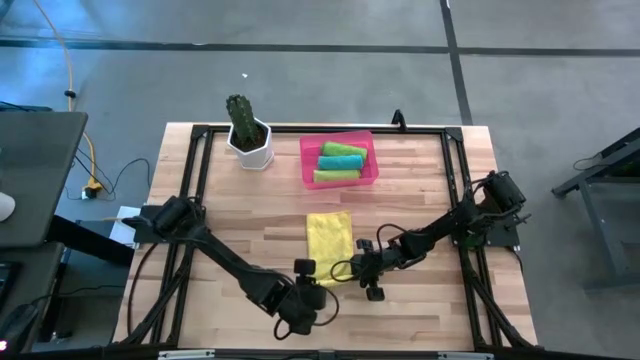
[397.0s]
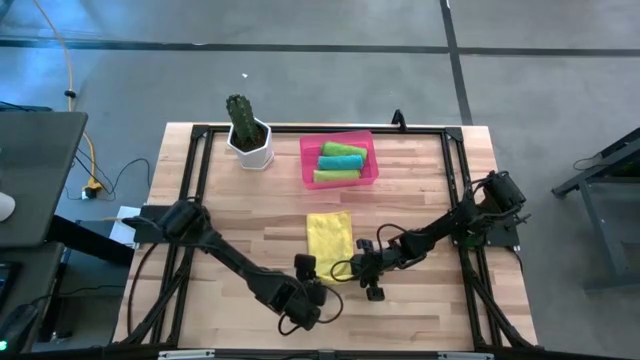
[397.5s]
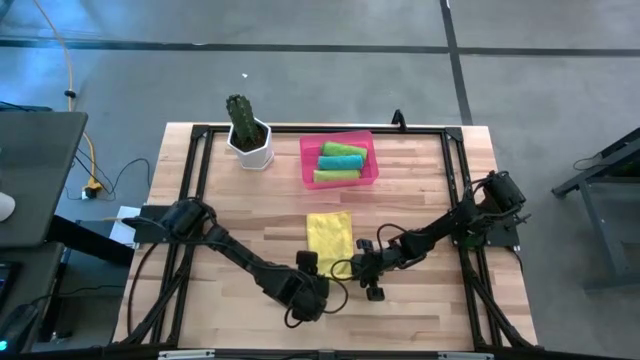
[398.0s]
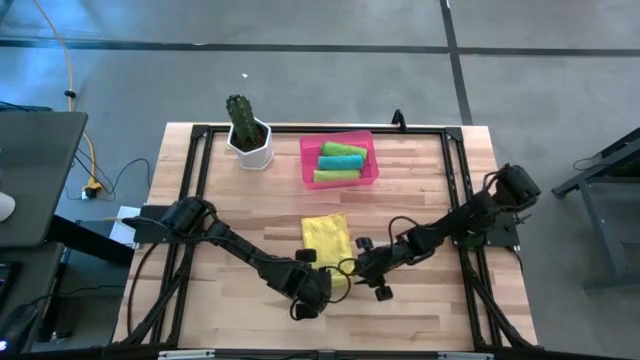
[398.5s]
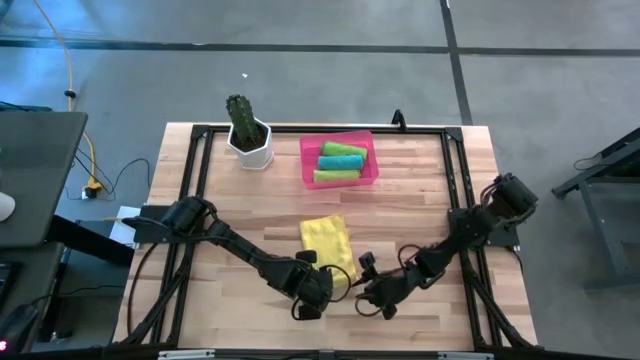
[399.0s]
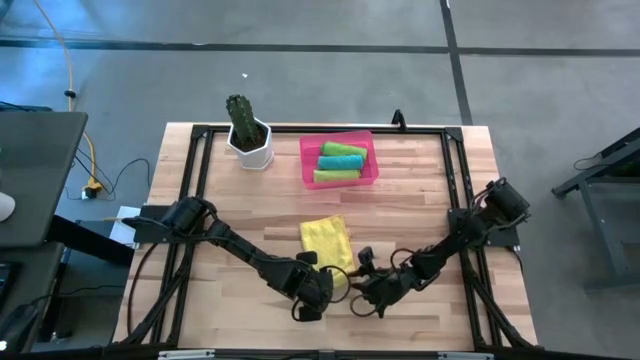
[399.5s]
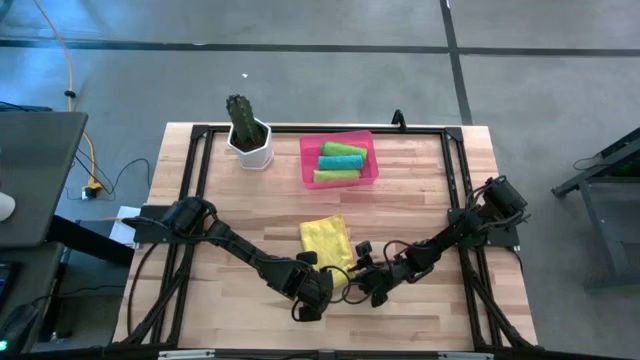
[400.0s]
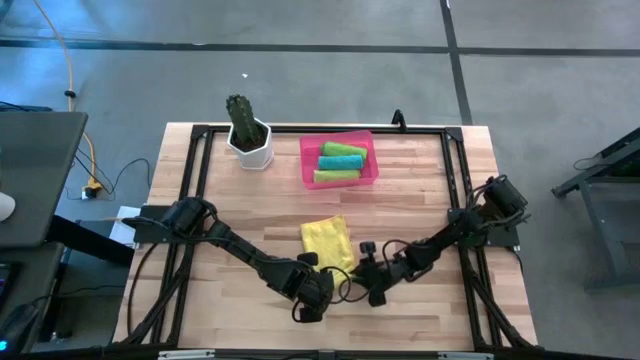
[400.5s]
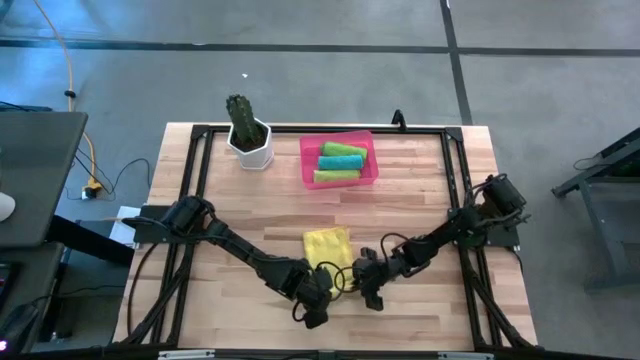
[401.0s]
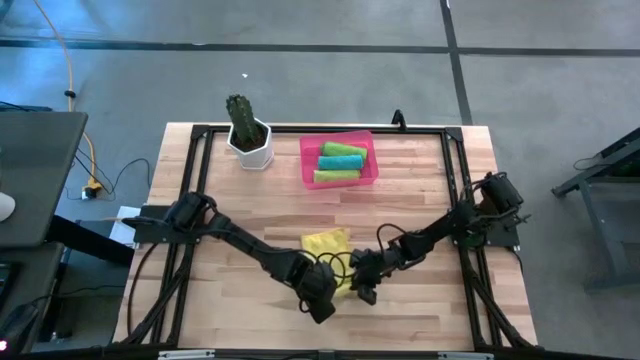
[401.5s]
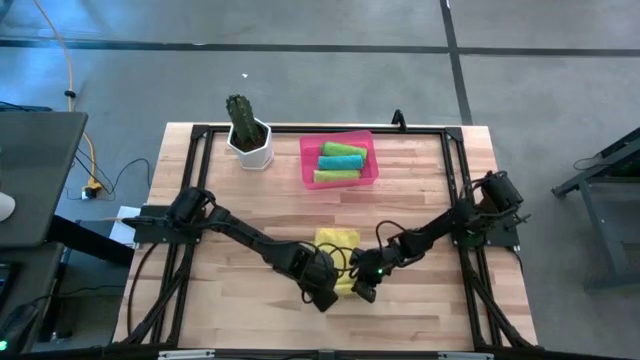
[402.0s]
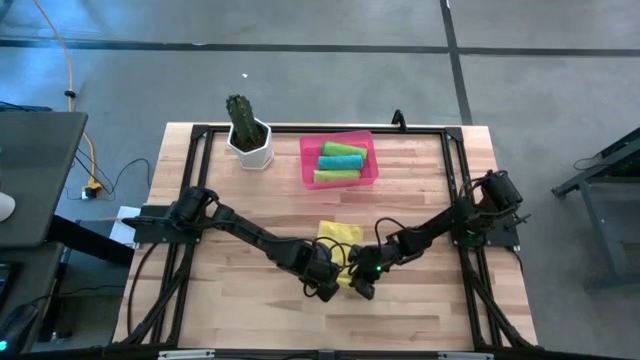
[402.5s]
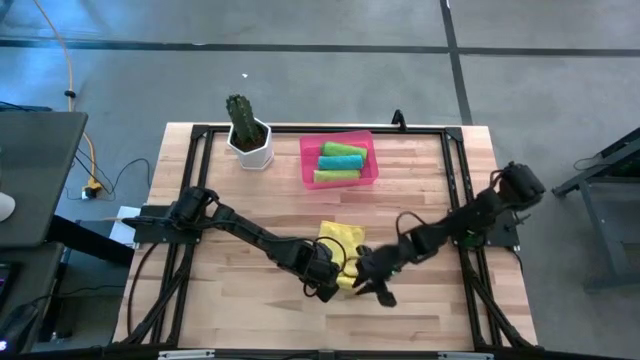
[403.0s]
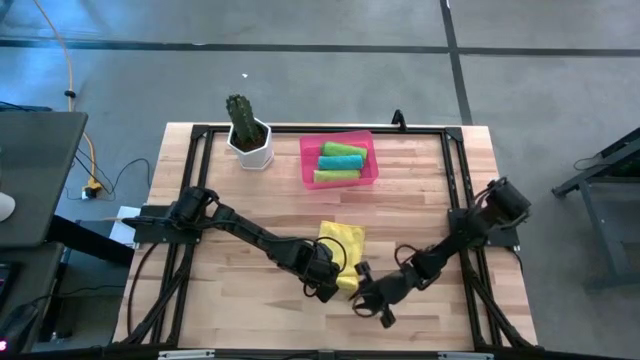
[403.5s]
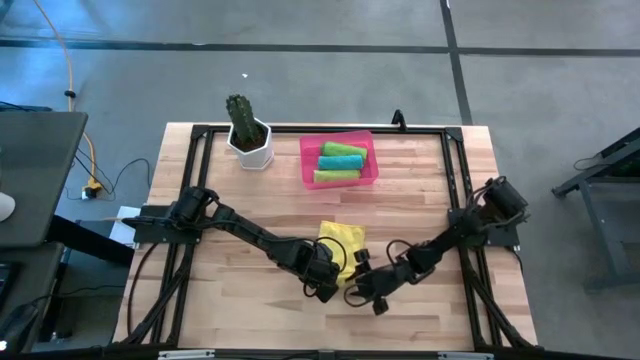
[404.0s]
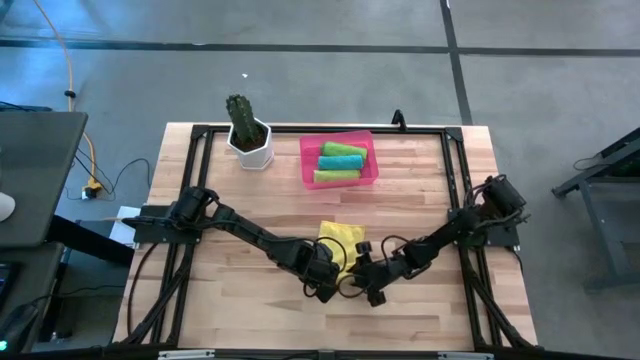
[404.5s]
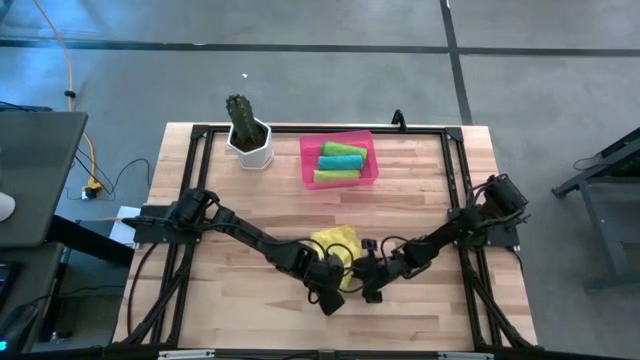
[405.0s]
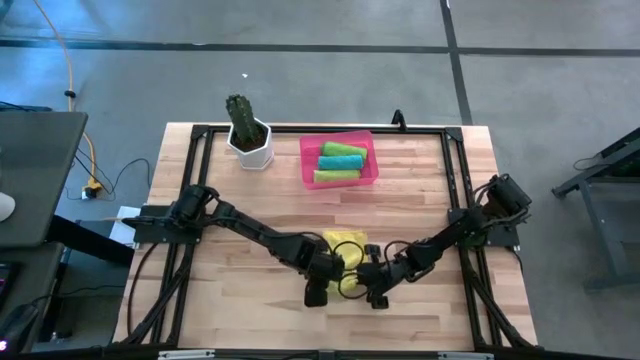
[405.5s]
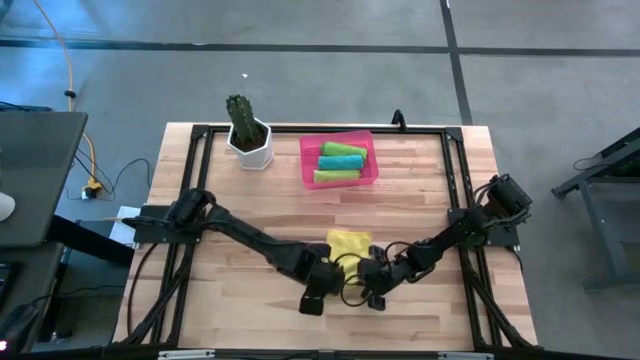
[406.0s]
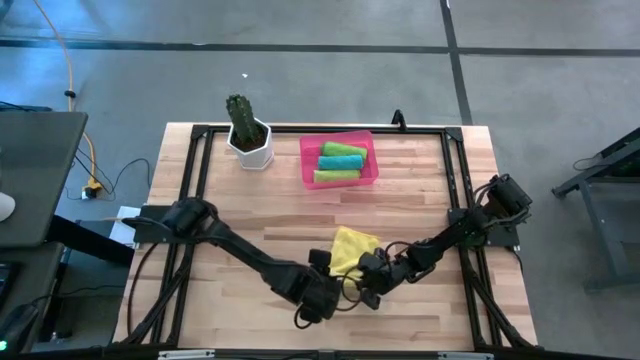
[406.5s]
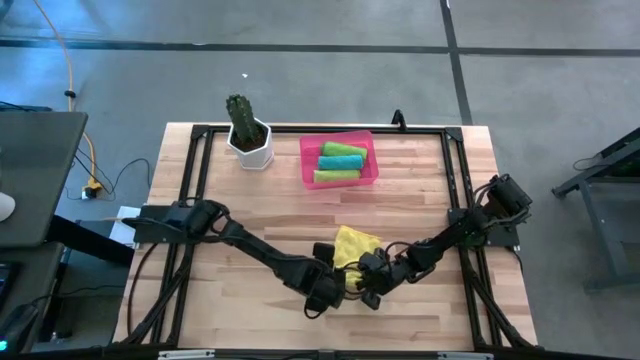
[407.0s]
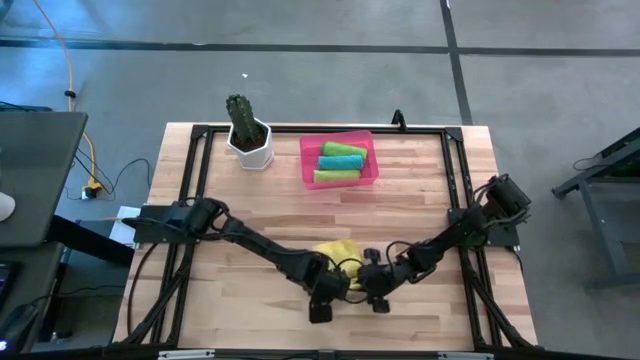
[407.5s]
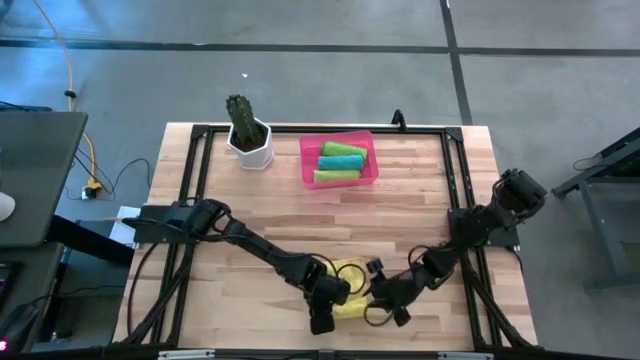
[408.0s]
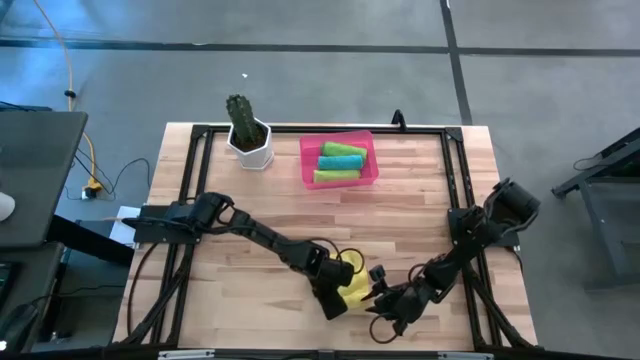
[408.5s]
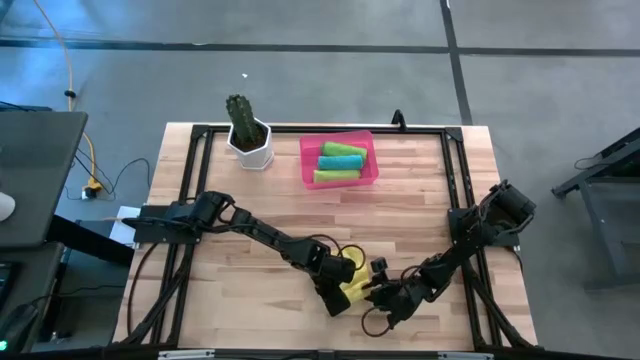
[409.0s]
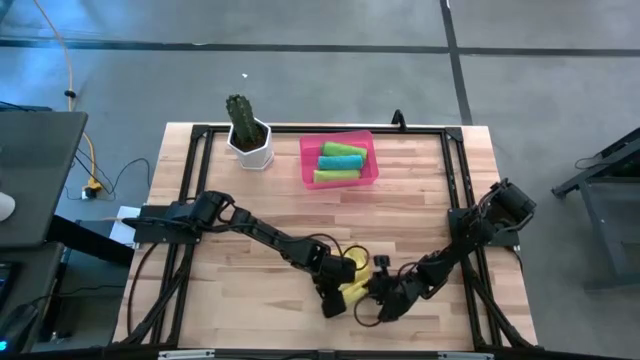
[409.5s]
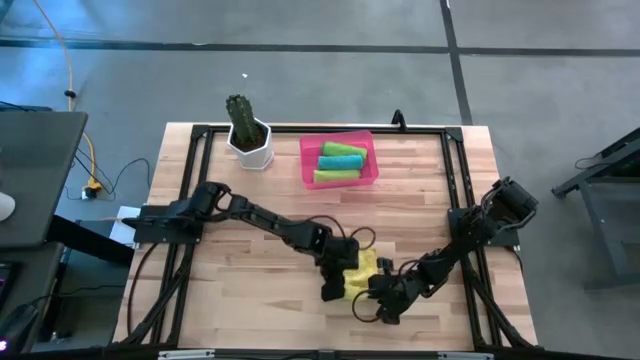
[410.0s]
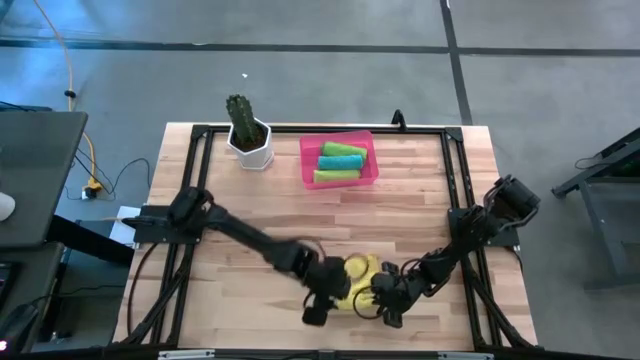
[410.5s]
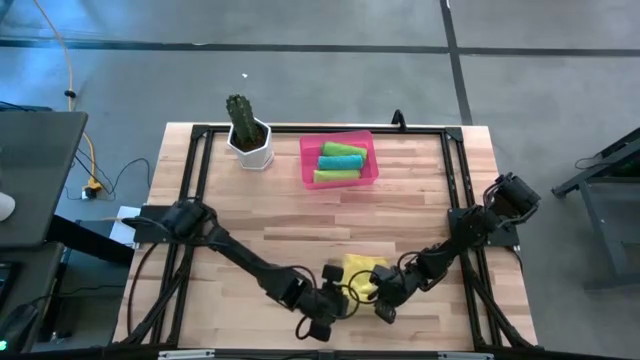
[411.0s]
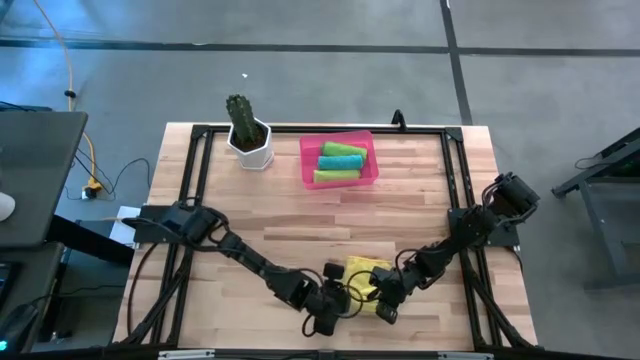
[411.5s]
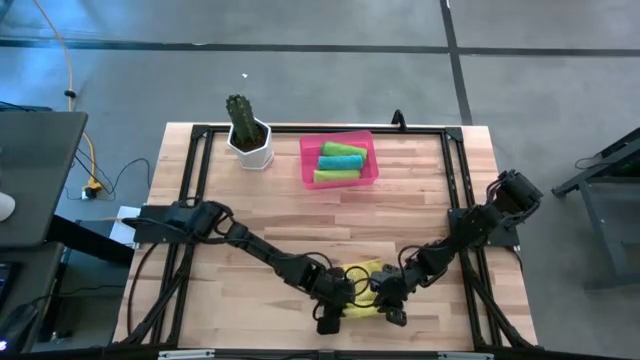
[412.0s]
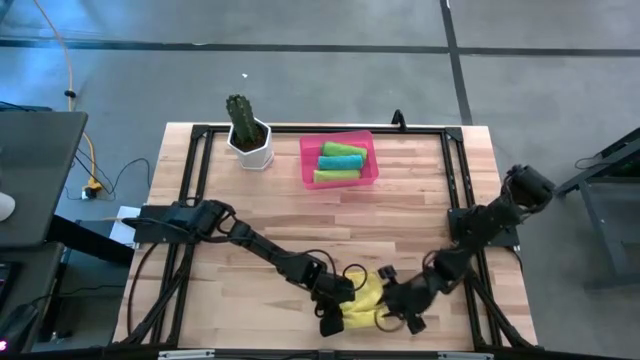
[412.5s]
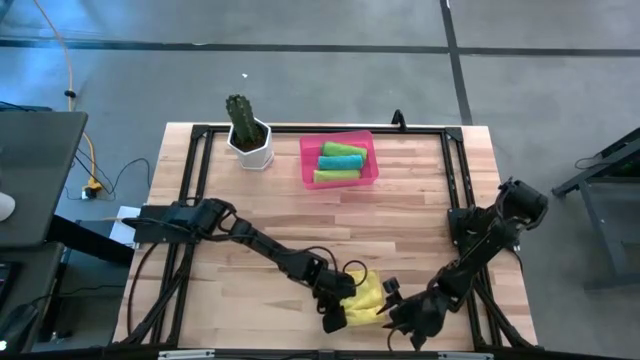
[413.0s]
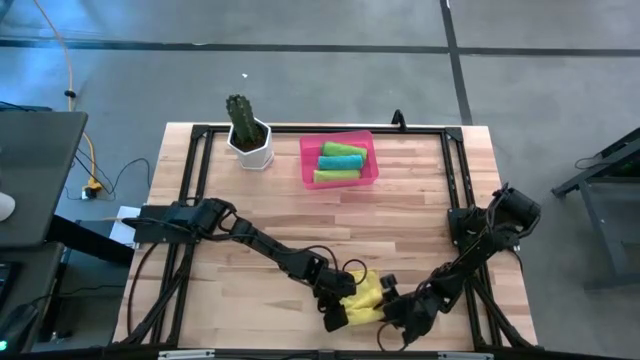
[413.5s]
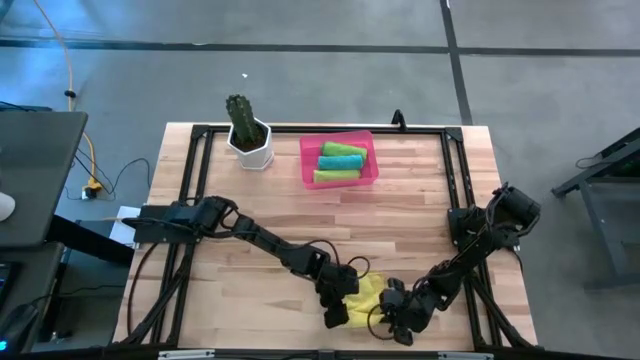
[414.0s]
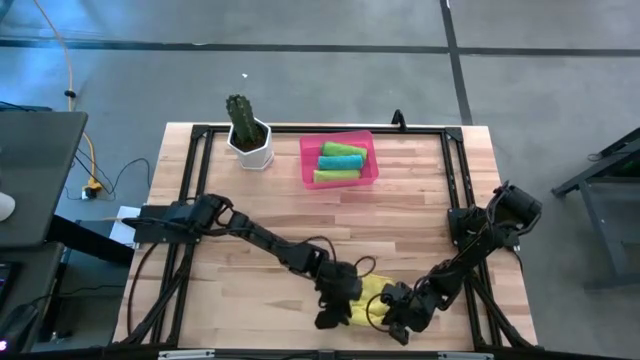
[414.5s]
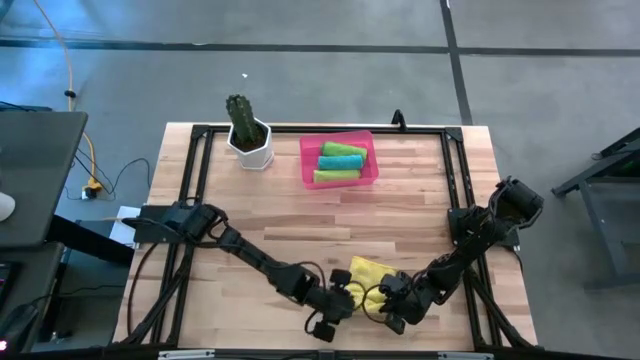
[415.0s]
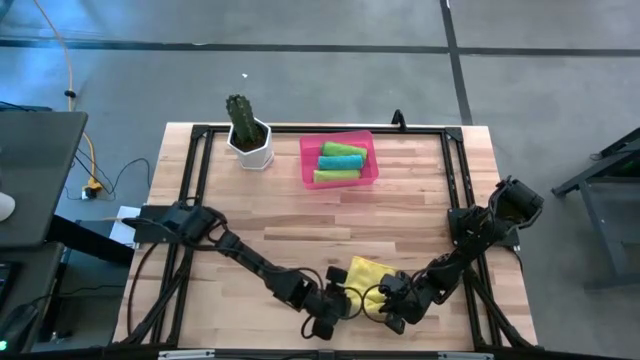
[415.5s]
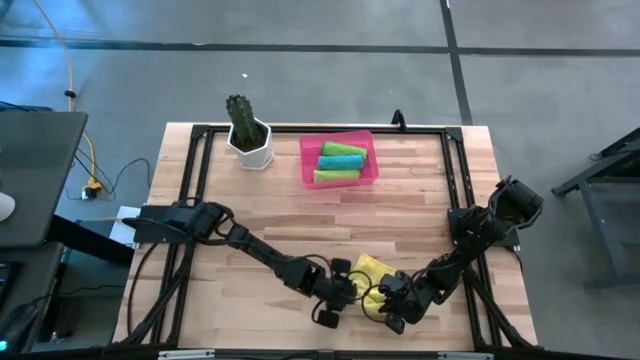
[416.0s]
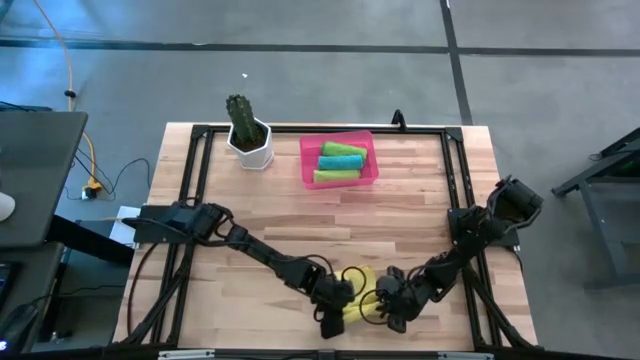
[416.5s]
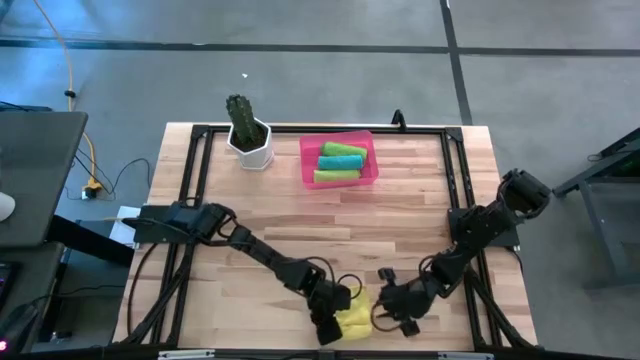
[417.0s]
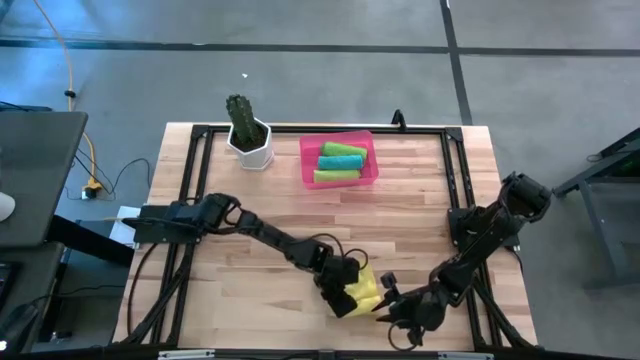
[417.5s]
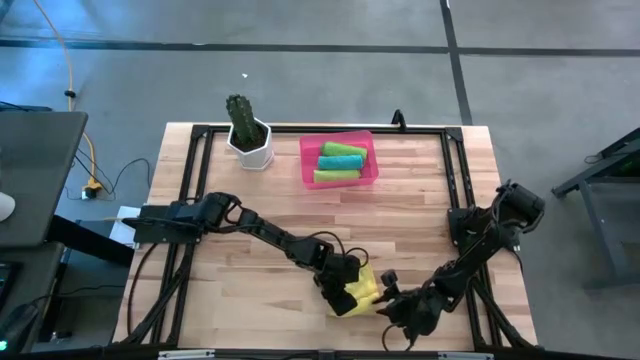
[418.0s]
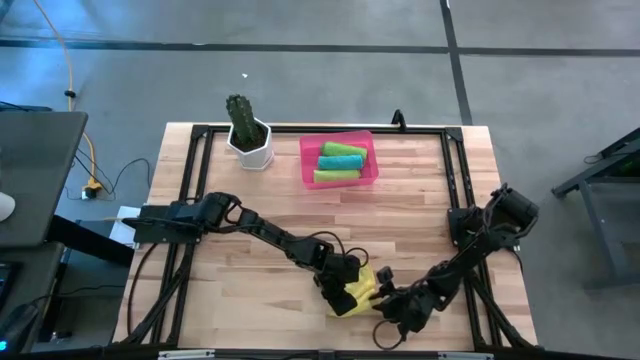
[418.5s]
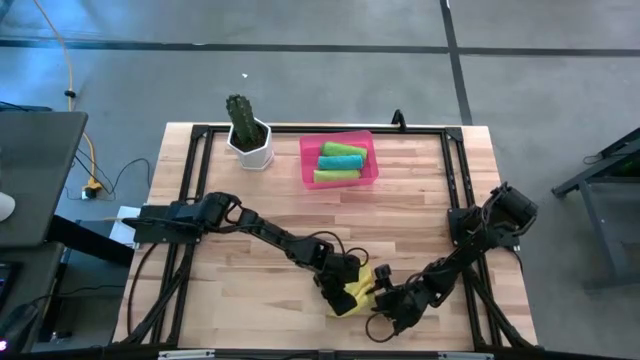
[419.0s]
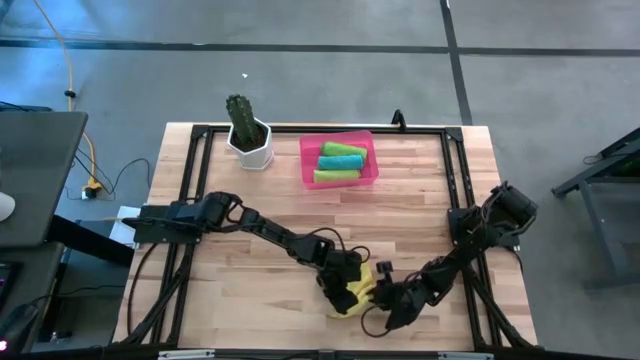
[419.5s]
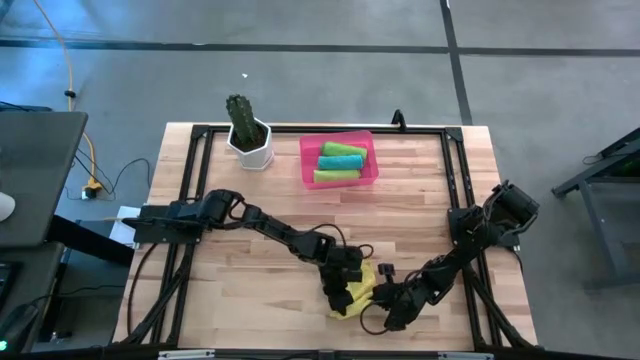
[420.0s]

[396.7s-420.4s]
Task: Roll microfiber towels into tight, uniform cylinder then place into a basket
Roll the yellow microfiber cloth
